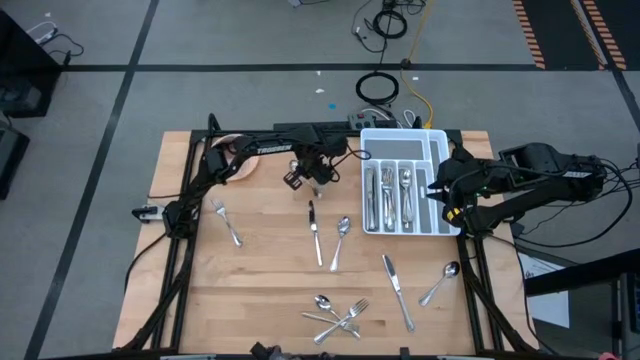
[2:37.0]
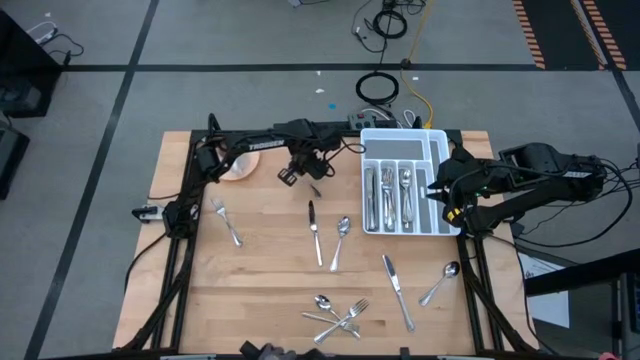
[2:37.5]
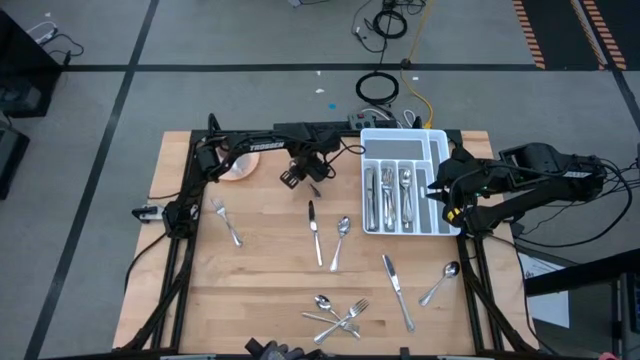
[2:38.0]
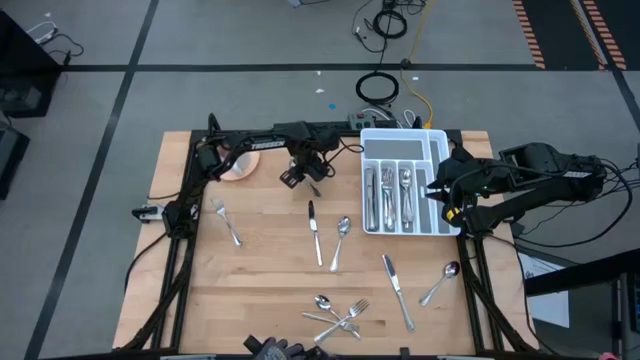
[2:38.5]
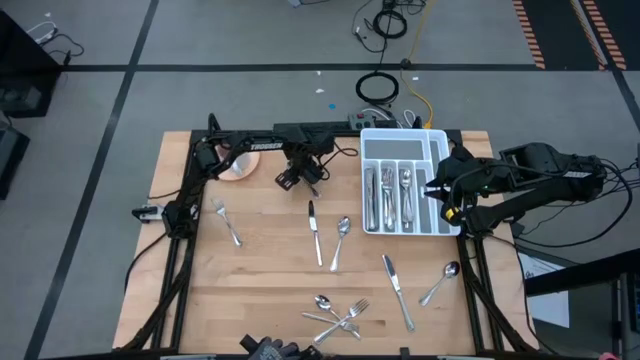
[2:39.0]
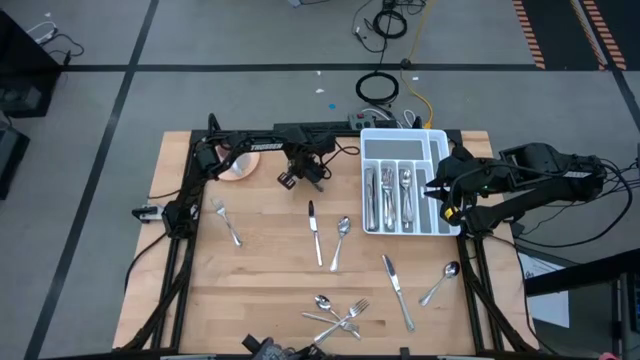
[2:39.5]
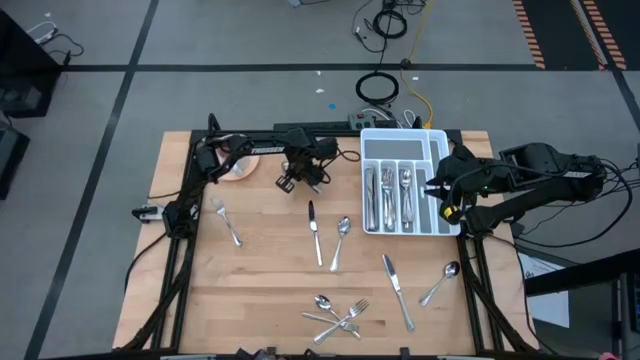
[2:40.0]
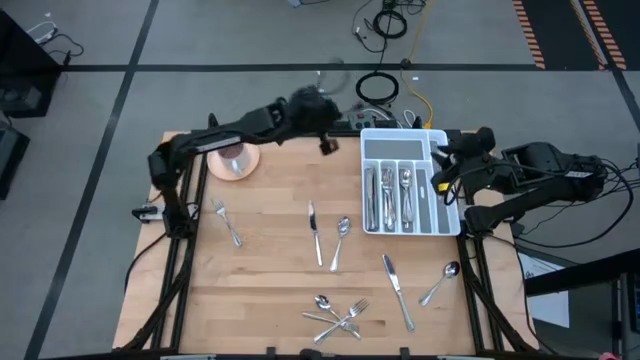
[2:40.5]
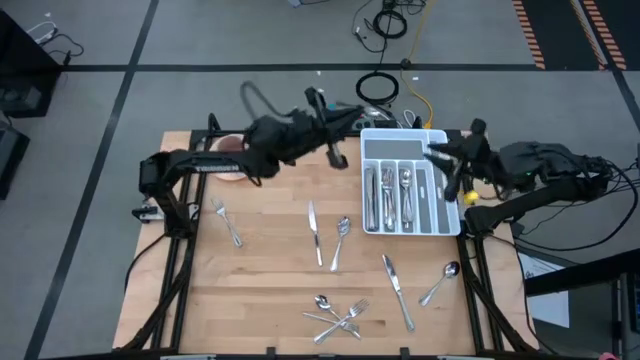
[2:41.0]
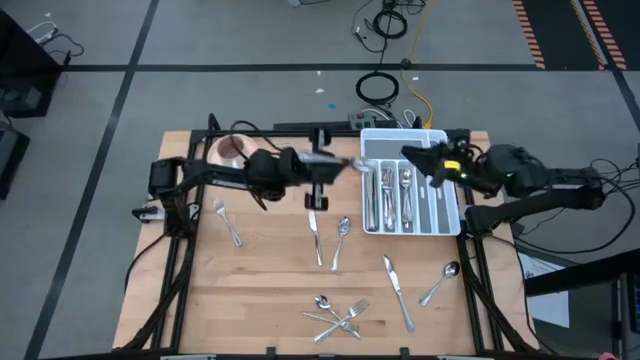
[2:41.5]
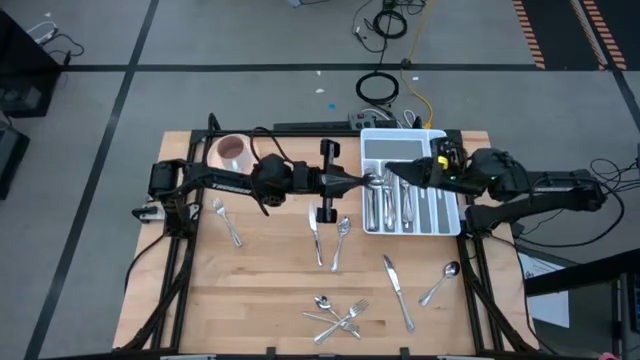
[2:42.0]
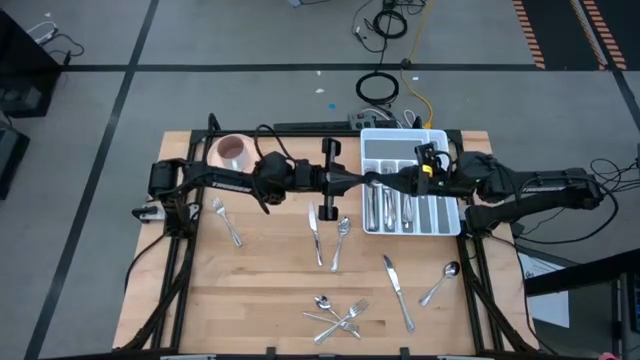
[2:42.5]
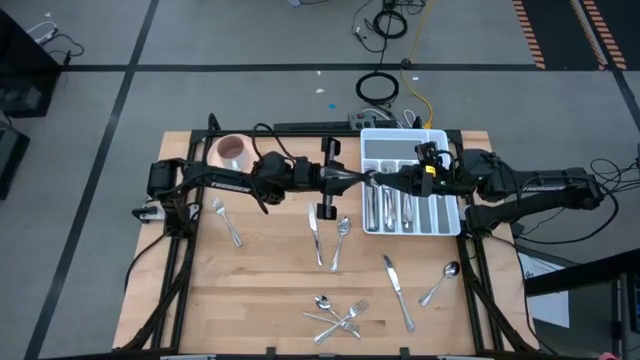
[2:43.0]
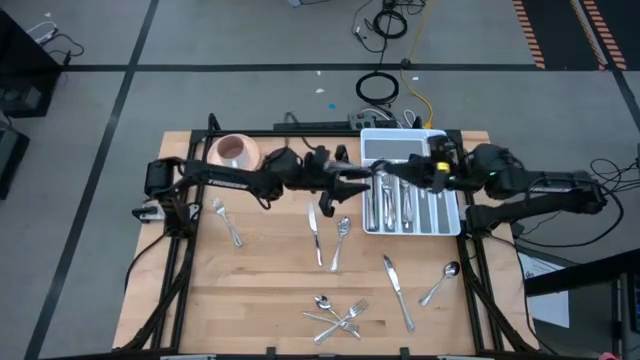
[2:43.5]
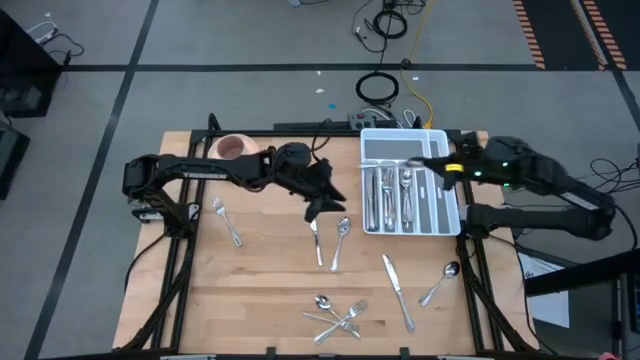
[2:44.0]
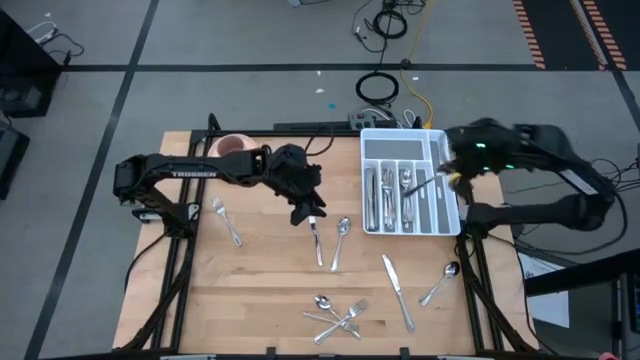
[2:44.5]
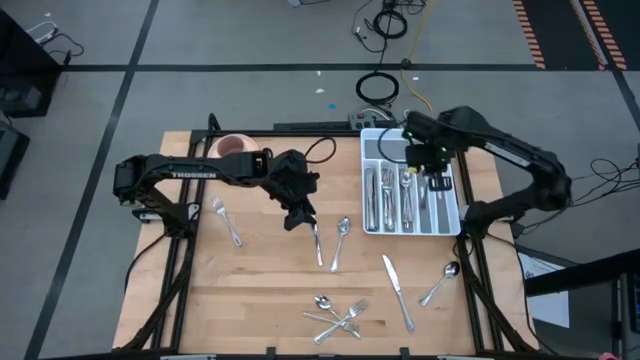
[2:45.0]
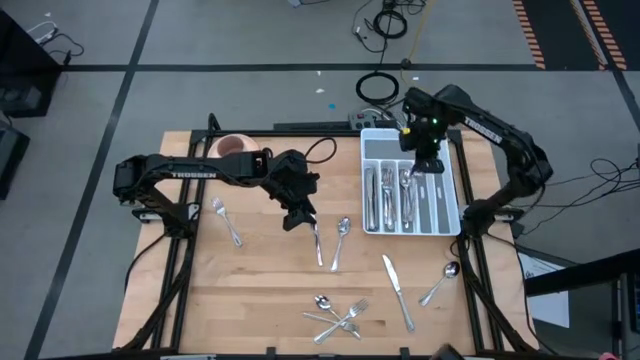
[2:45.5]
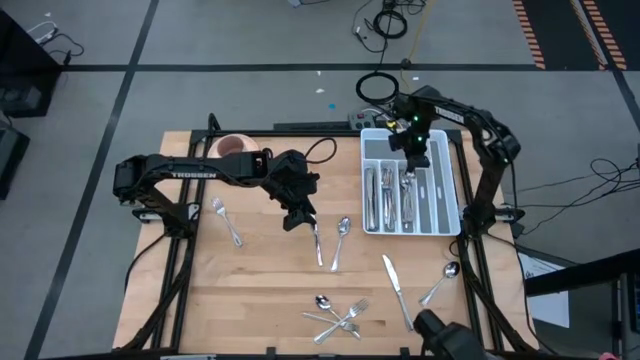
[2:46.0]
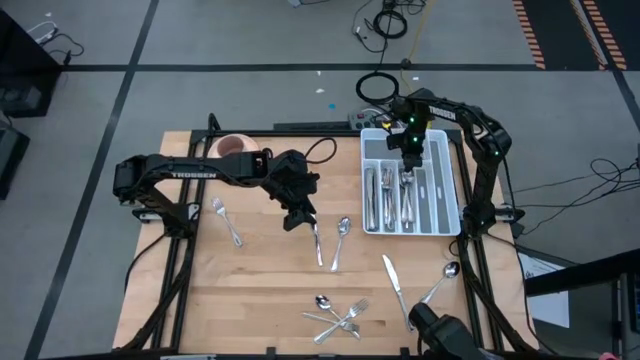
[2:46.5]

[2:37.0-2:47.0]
Task: Sort silverware
Put the silver spoon into the white cutlery tray

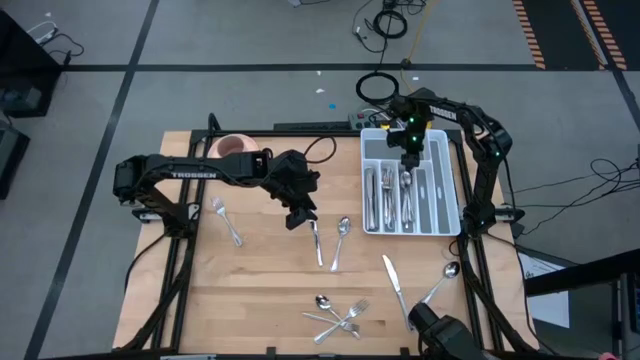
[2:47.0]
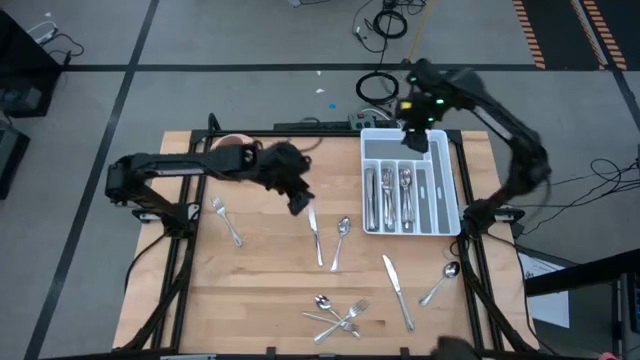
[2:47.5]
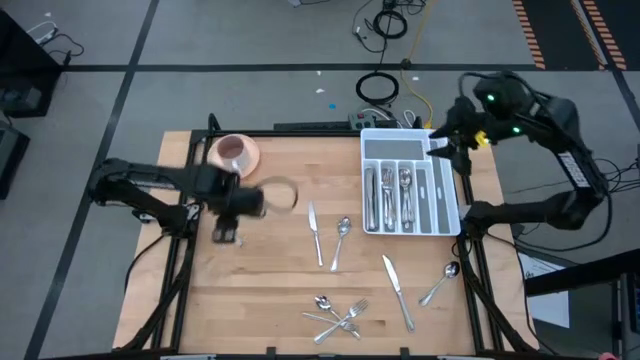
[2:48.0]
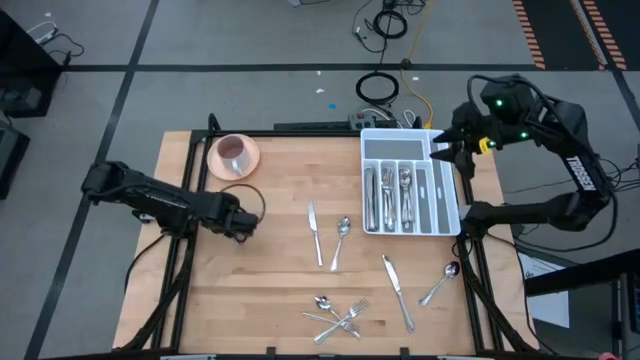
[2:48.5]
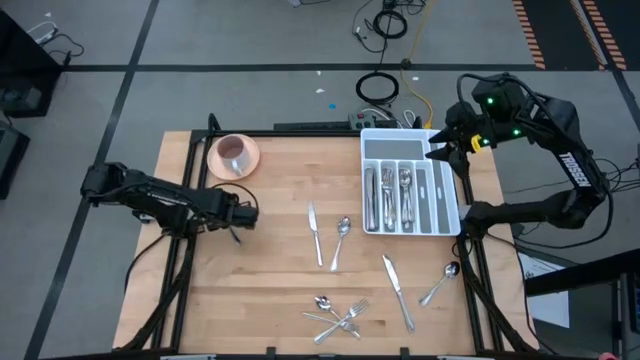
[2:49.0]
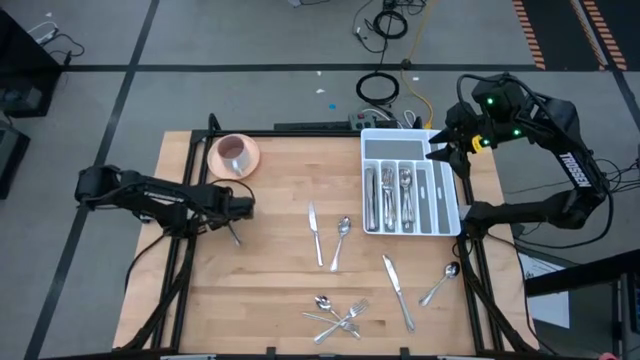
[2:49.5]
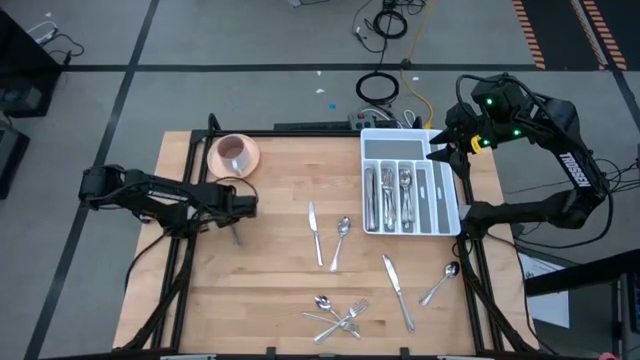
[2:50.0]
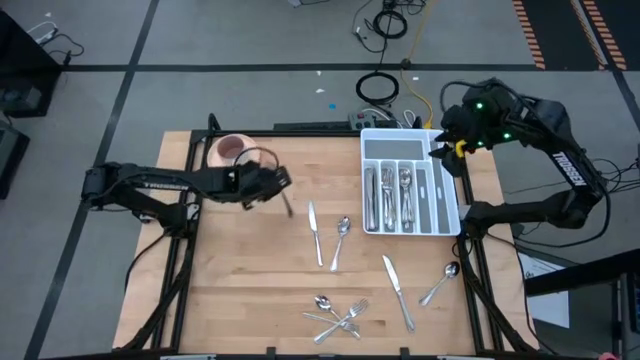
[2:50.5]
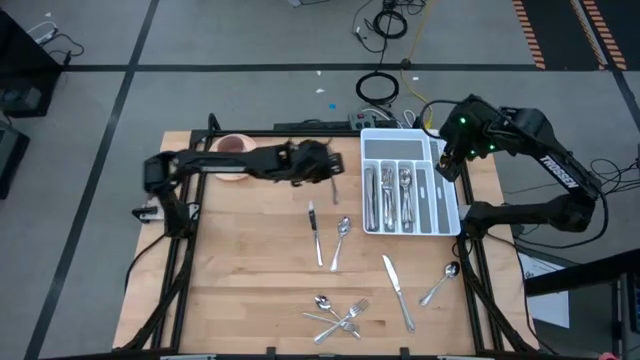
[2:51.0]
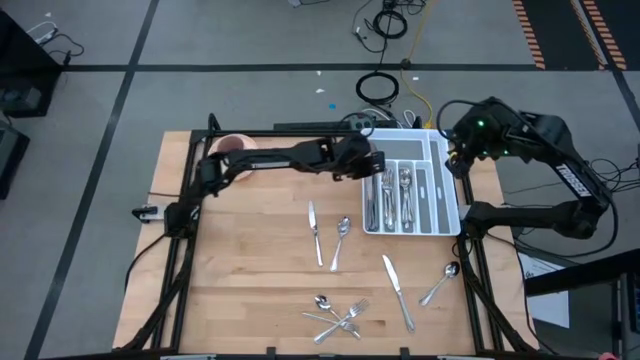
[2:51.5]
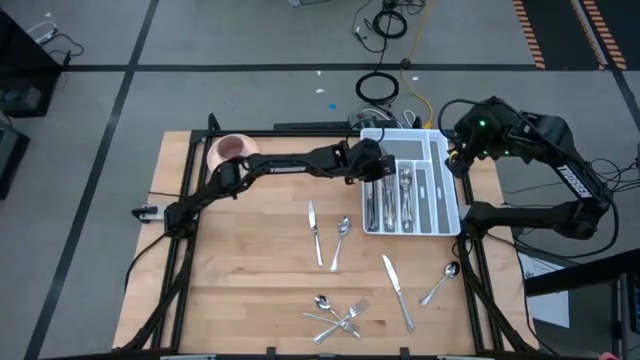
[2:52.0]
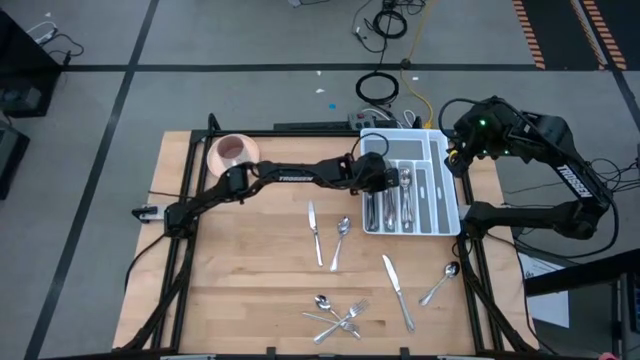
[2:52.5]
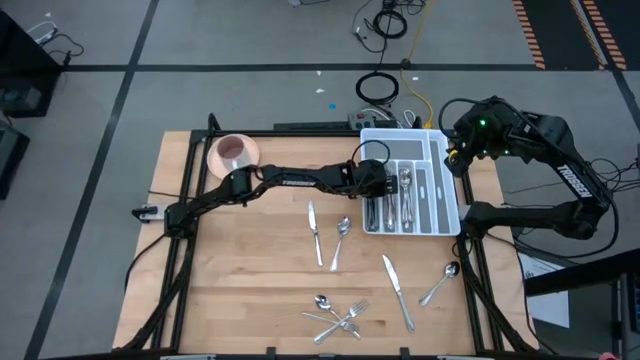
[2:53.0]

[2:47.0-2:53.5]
Put the silver fork into the white cutlery tray

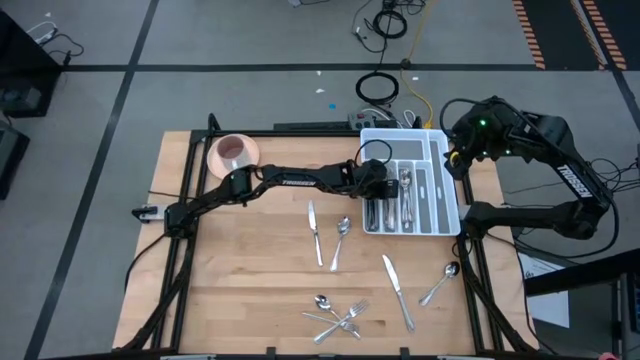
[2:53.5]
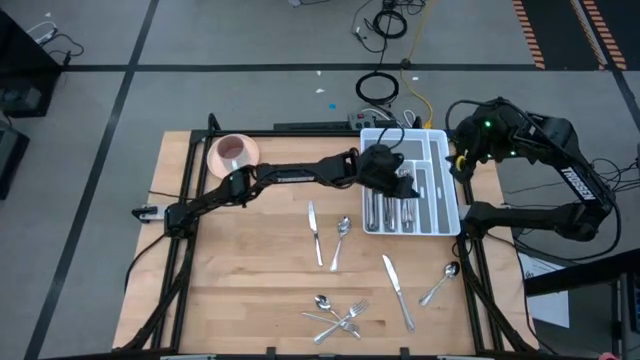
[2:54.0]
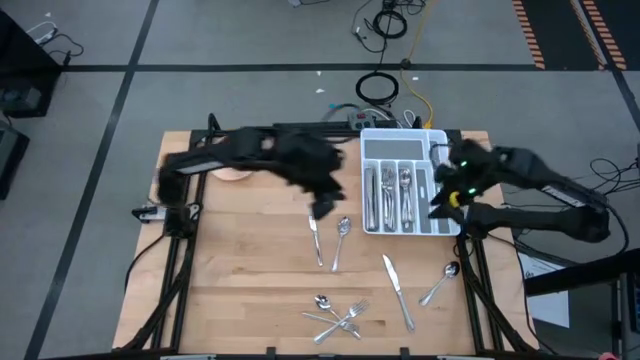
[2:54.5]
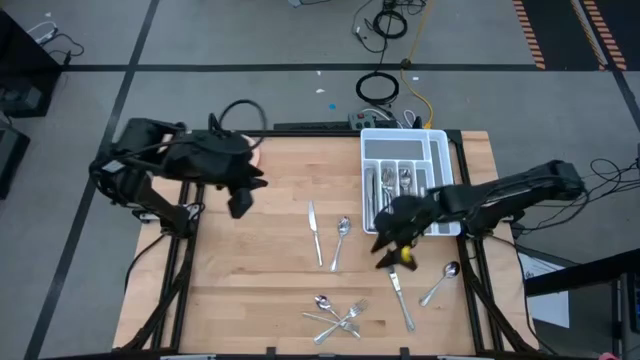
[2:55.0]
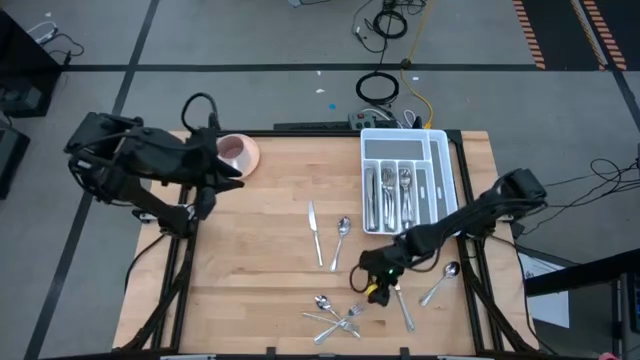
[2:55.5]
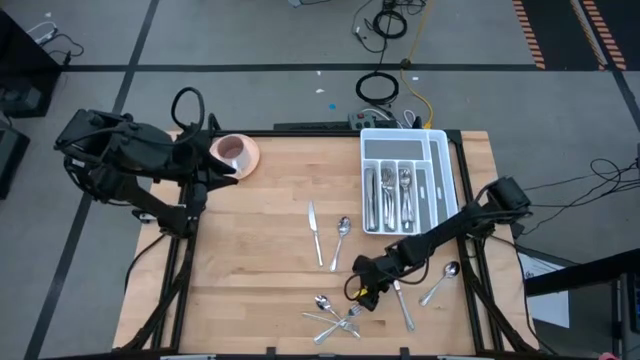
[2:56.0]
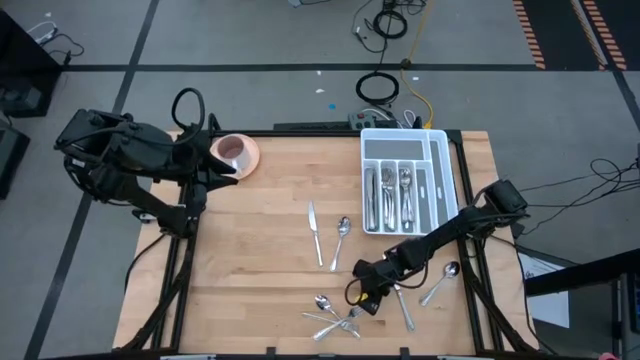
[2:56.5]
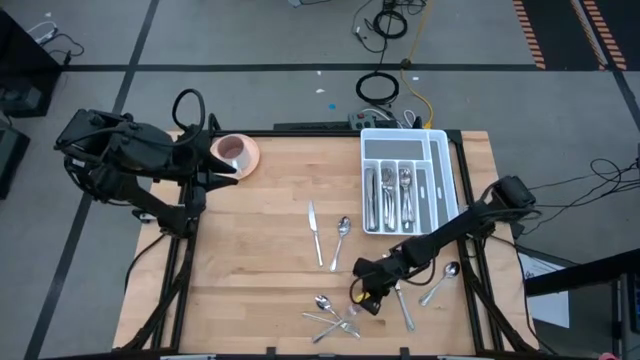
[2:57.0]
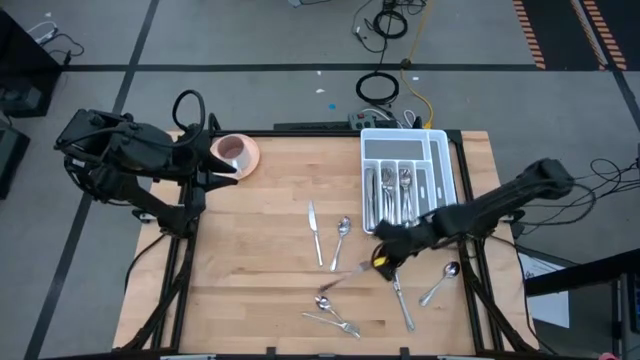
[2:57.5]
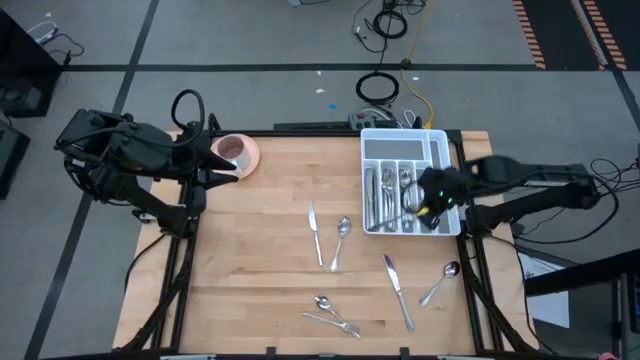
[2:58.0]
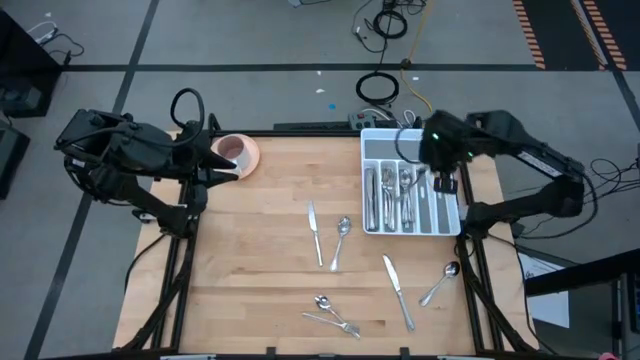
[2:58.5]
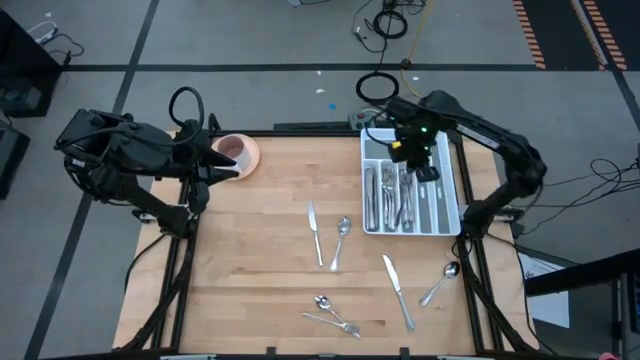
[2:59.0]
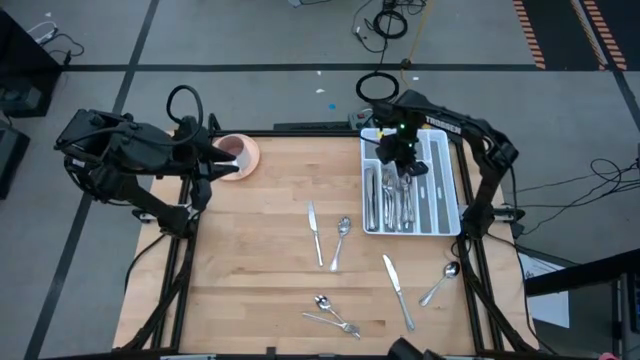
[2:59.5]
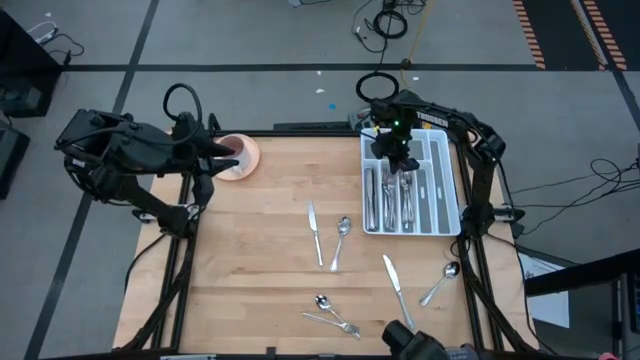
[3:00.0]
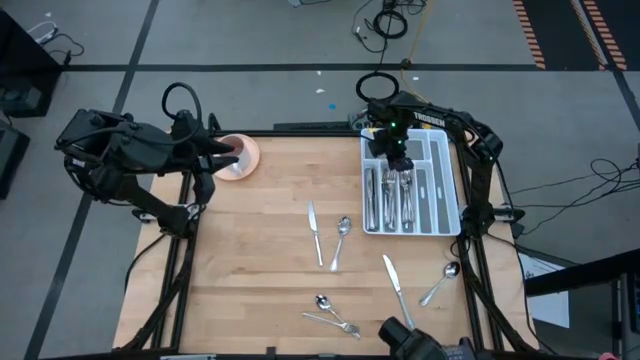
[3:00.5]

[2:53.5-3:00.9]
Put the silver fork into the white cutlery tray
